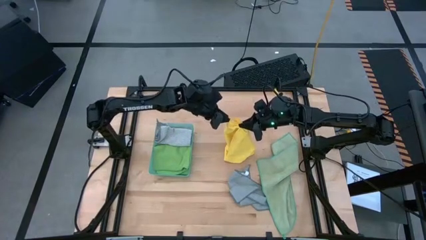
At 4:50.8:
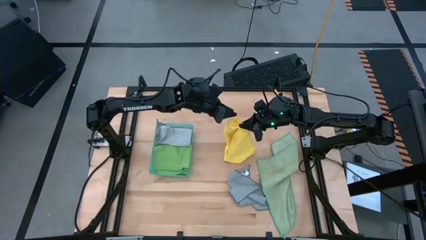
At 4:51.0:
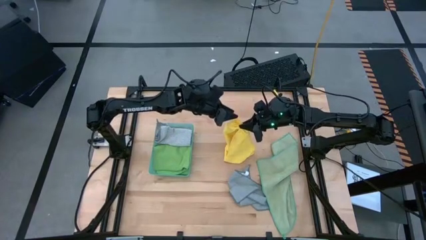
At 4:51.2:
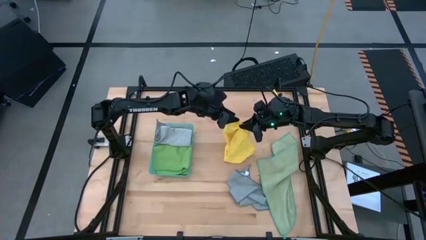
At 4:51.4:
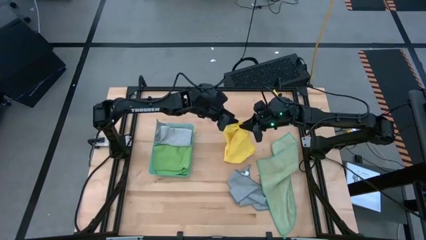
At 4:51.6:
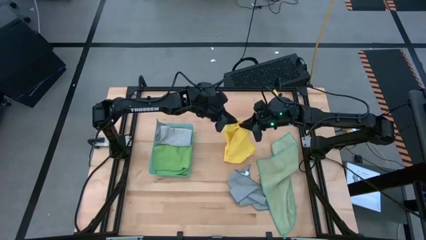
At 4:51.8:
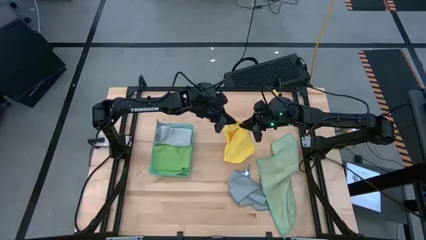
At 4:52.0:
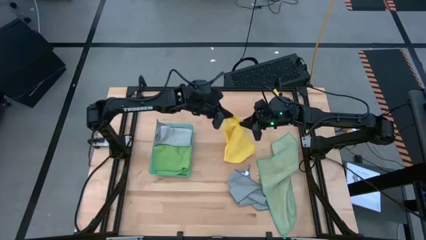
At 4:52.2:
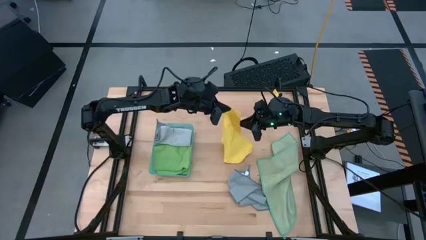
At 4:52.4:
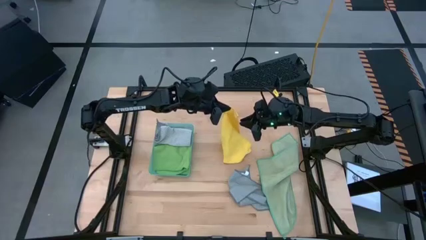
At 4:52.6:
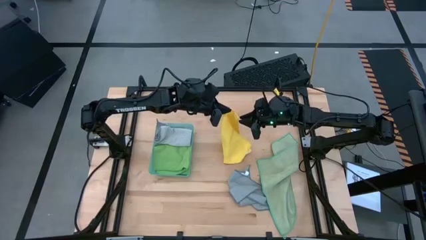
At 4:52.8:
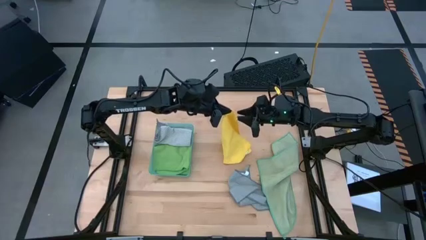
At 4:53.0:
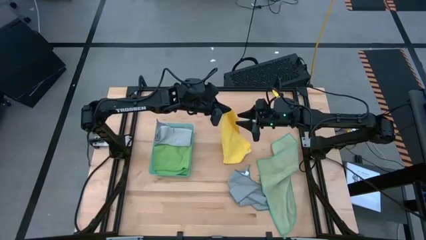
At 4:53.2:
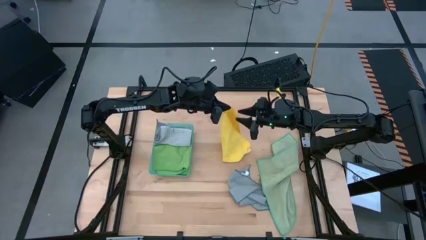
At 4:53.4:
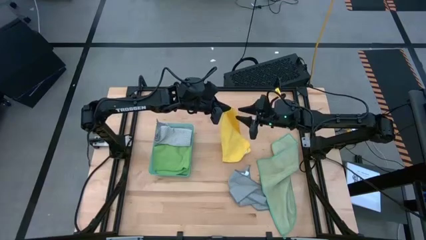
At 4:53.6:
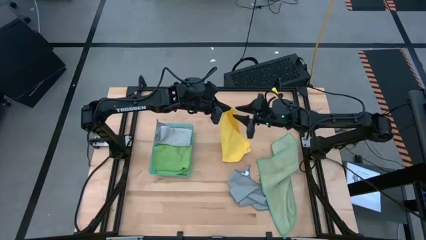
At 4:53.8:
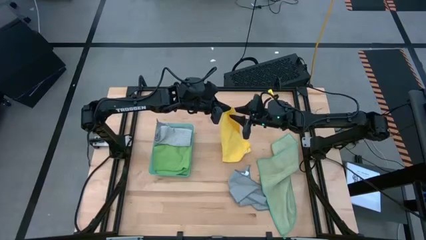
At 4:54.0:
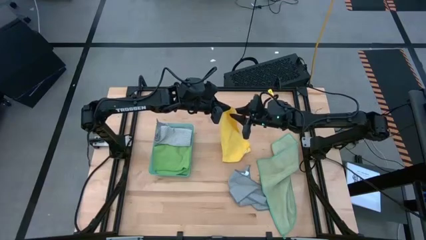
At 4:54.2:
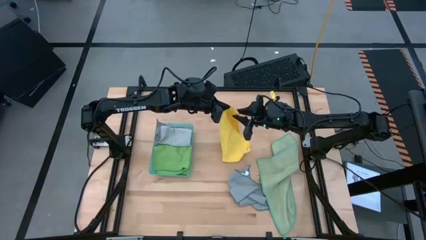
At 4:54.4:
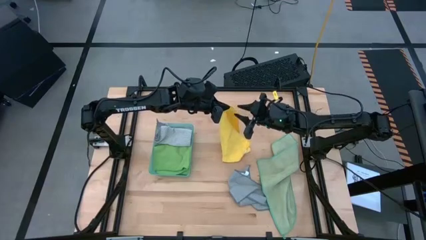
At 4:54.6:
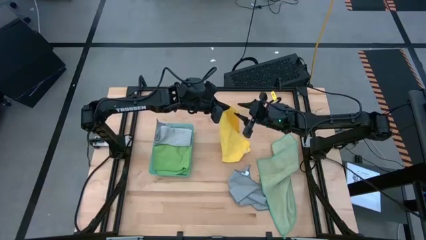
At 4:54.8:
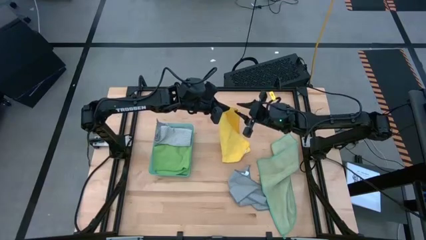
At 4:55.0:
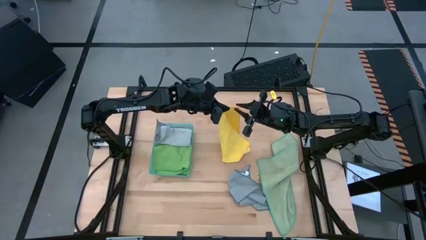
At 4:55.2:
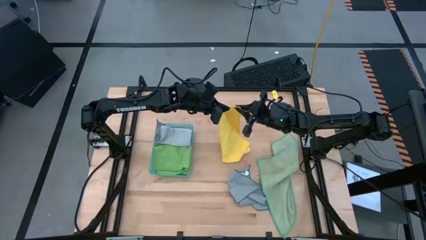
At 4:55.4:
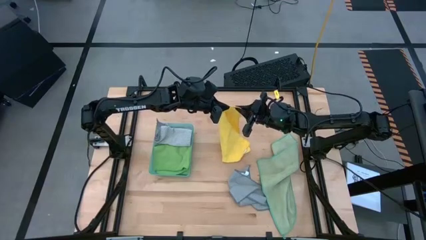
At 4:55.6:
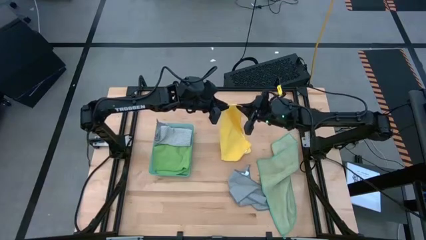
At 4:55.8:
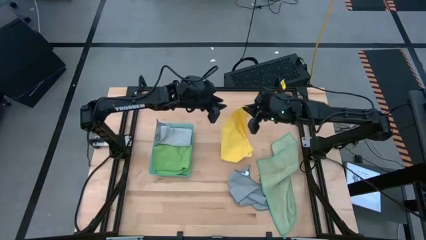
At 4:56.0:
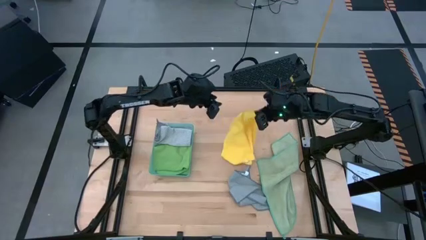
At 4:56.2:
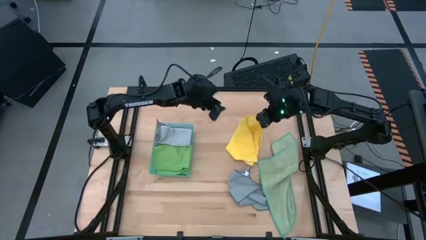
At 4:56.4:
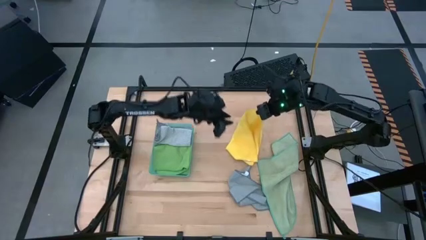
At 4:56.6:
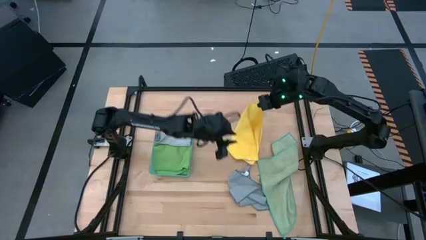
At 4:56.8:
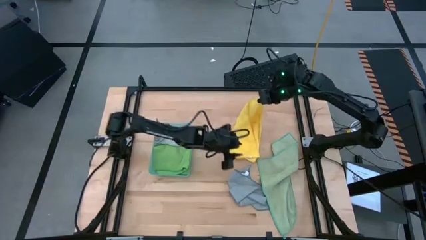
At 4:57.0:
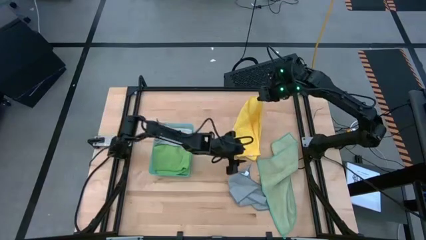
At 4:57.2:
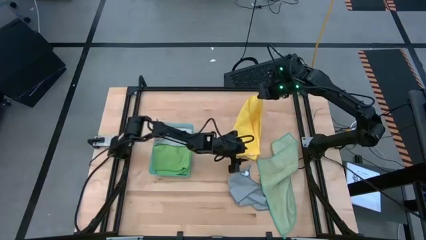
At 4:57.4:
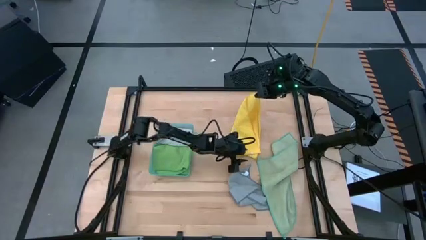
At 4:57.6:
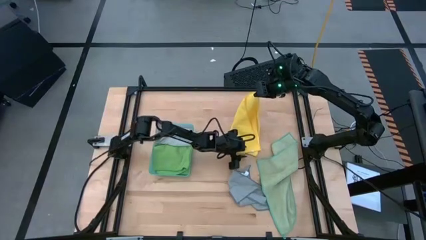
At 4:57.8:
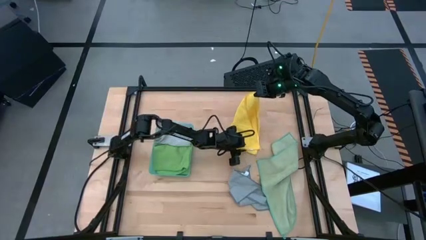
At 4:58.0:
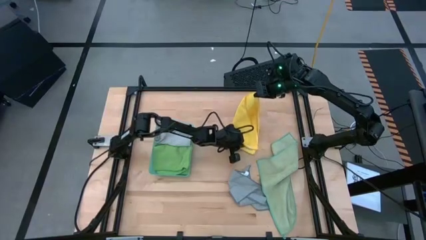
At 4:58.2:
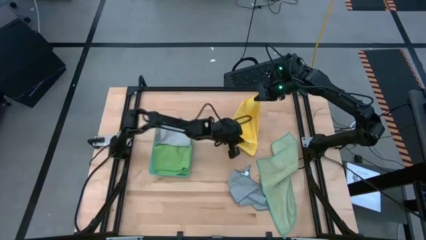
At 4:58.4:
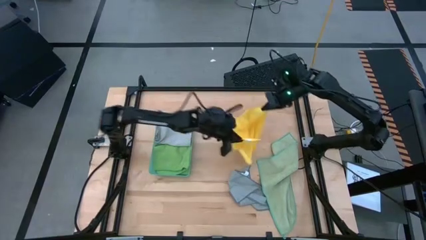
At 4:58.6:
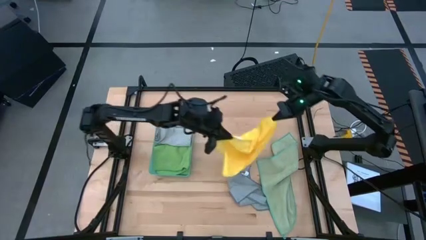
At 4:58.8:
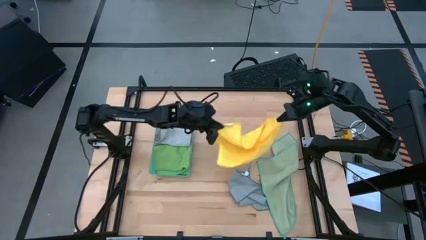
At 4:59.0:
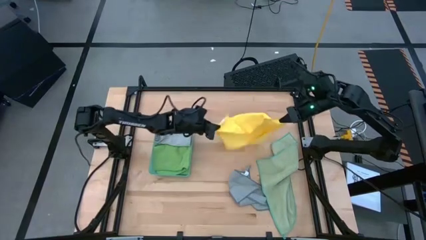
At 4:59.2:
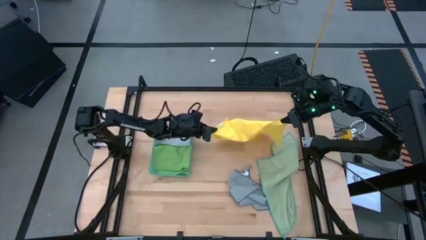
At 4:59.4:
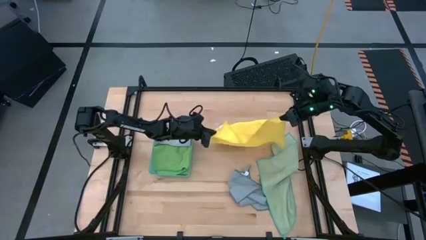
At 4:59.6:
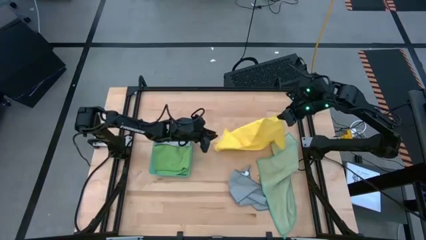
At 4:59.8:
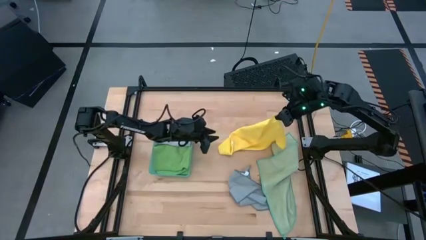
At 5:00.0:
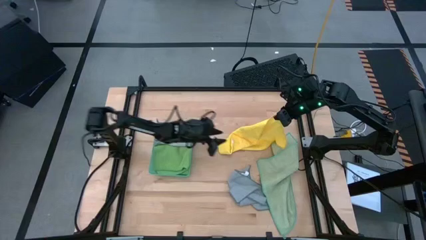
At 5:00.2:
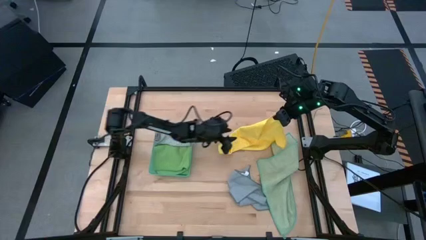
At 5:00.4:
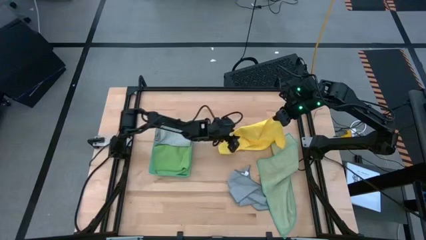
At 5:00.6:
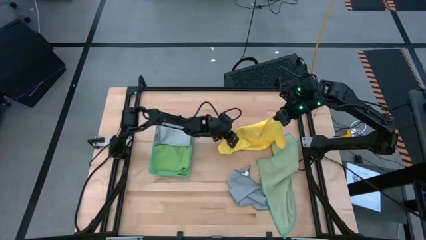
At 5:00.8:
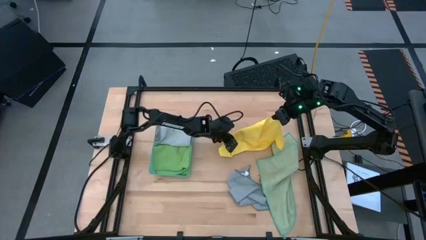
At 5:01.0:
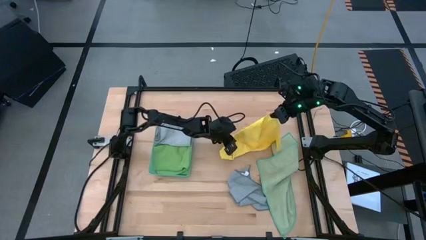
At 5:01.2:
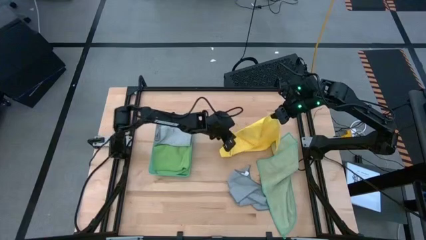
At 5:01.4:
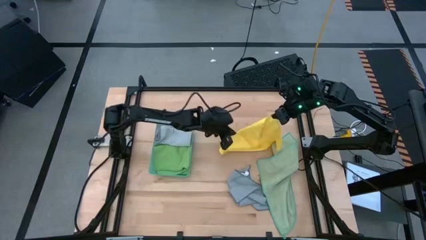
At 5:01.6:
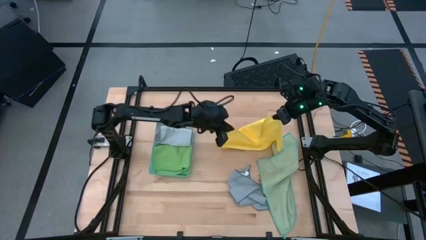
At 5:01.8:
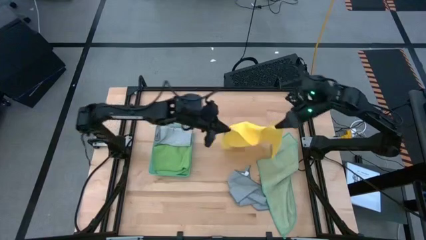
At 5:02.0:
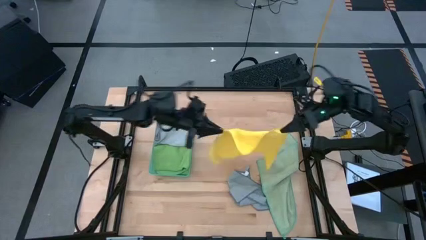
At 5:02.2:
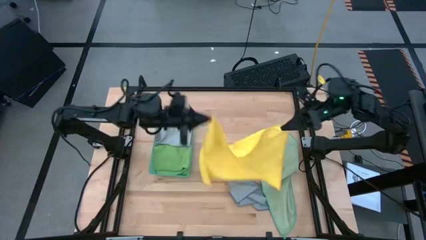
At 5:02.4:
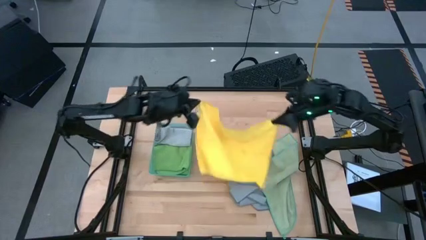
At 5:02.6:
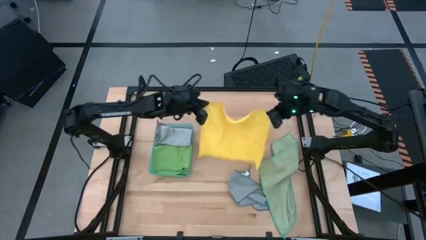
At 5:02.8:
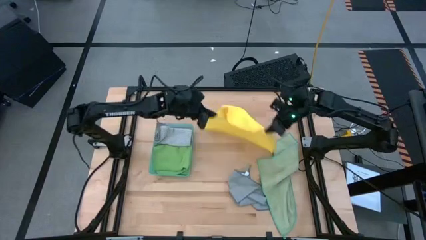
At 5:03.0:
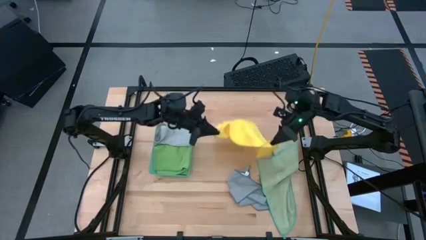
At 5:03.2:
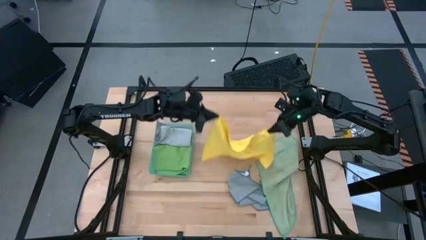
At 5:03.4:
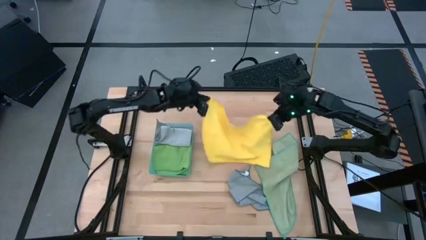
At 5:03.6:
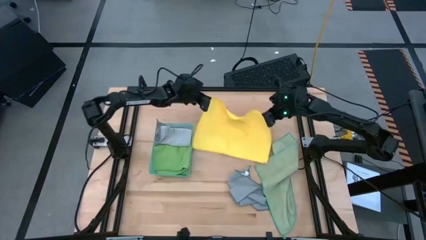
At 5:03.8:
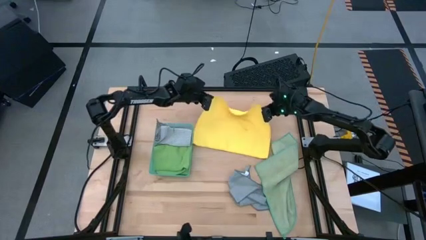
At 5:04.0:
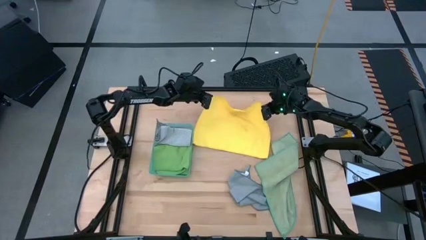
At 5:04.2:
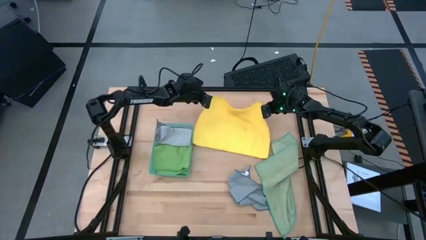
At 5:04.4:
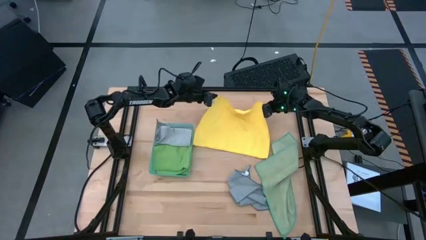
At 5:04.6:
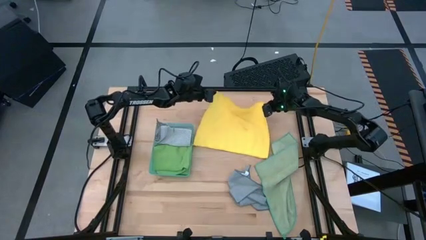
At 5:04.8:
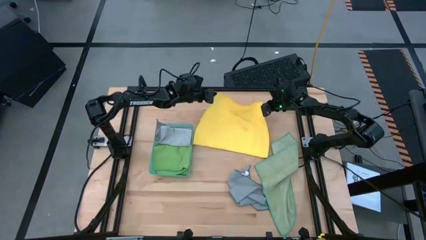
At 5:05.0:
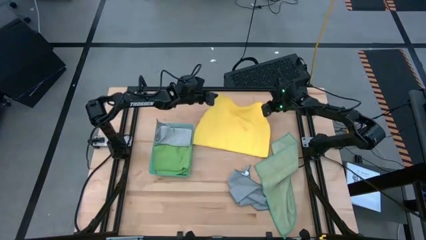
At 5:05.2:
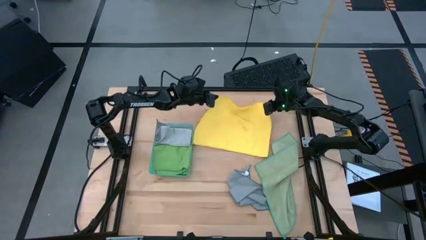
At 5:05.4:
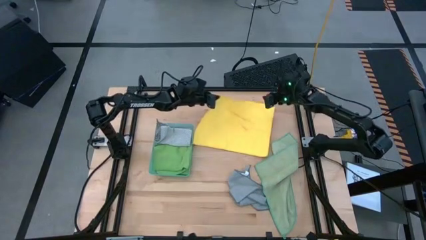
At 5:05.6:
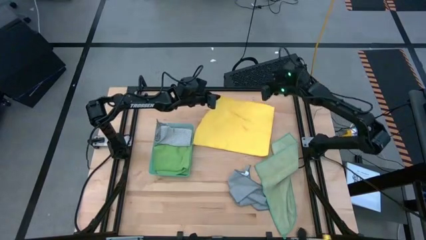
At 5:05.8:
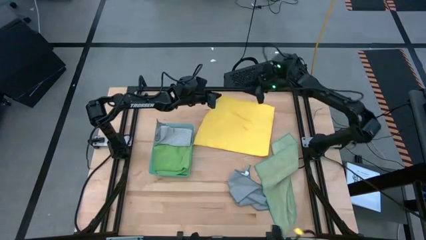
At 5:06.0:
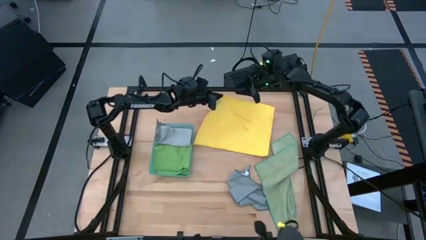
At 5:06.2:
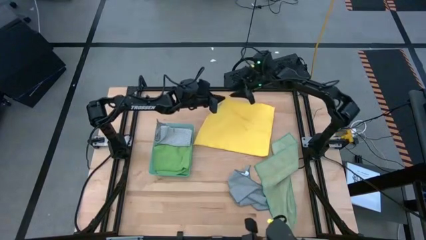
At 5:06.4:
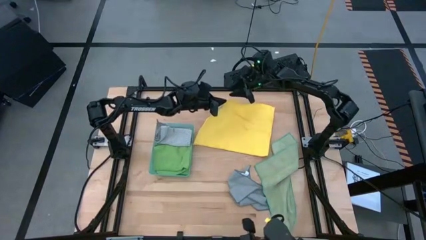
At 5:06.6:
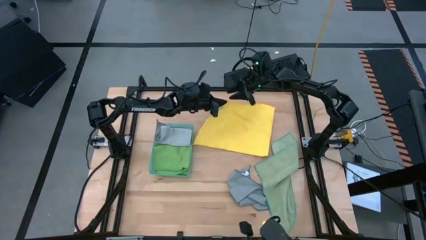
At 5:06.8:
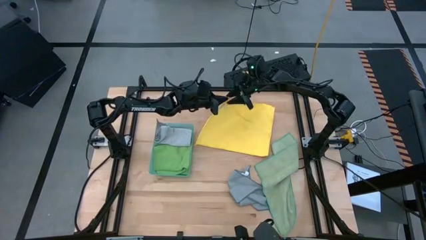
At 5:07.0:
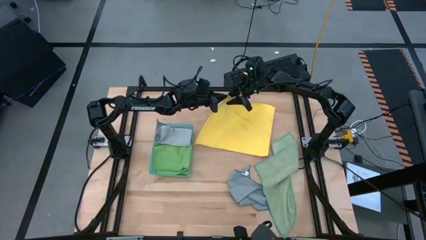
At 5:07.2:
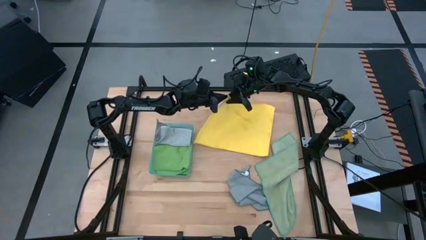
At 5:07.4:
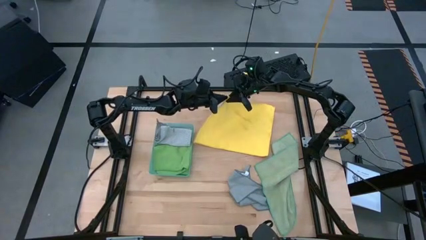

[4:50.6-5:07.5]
Task: Fold microfiber towels
Fold the yellow microfiber cloth
